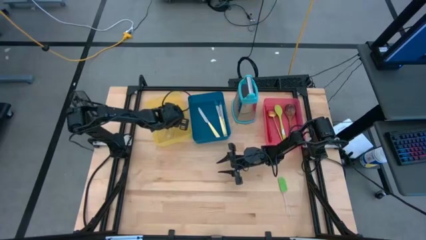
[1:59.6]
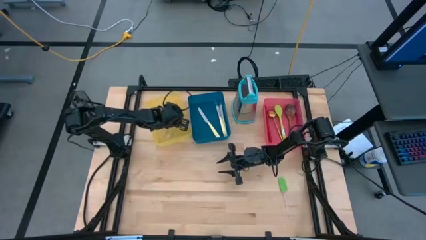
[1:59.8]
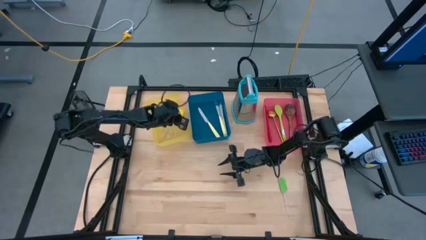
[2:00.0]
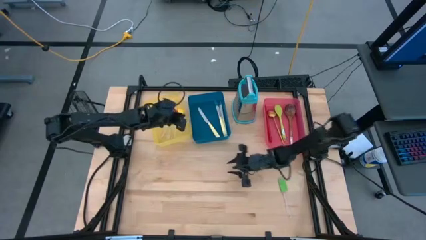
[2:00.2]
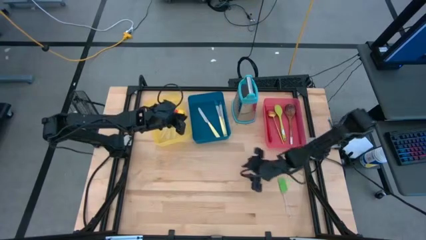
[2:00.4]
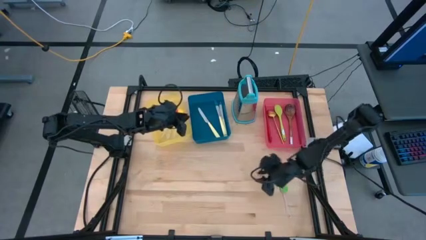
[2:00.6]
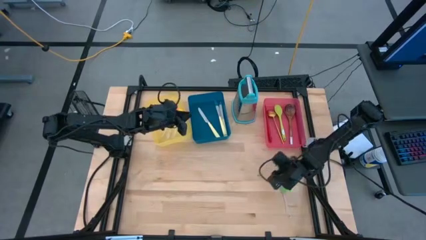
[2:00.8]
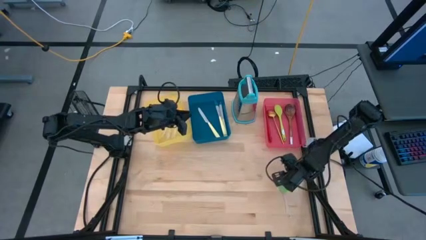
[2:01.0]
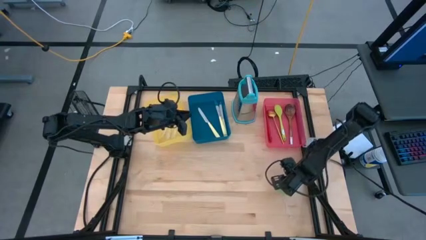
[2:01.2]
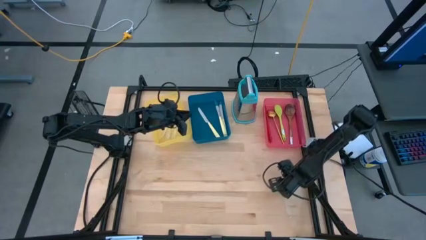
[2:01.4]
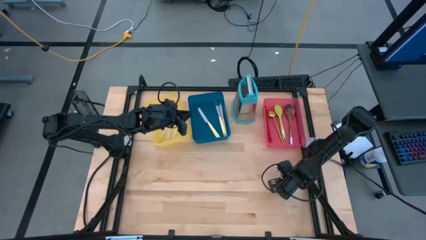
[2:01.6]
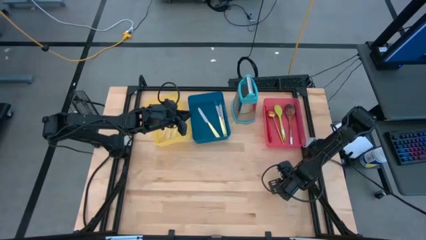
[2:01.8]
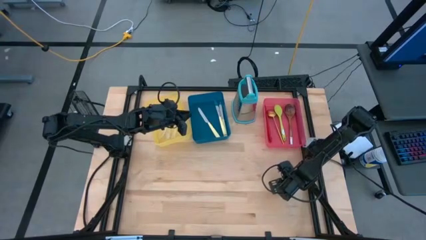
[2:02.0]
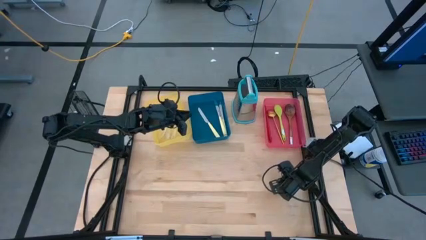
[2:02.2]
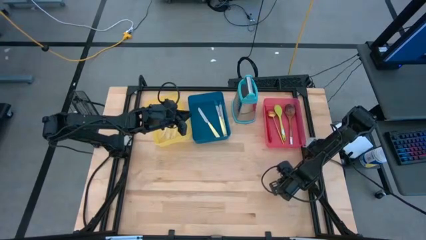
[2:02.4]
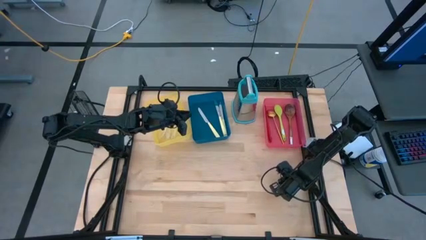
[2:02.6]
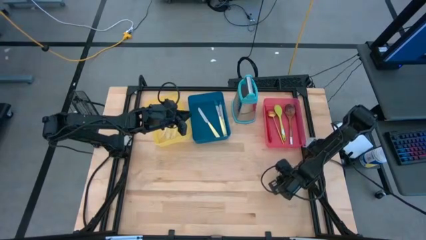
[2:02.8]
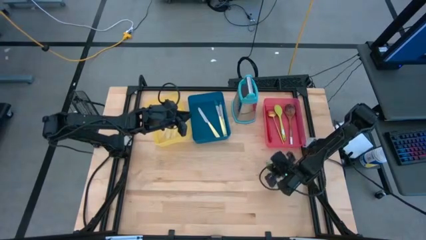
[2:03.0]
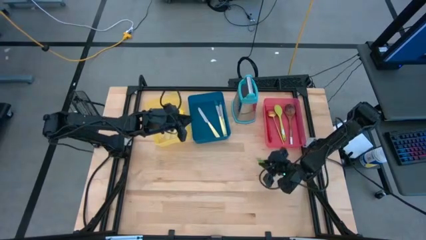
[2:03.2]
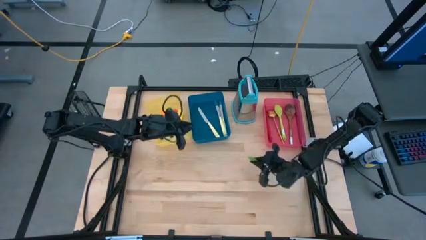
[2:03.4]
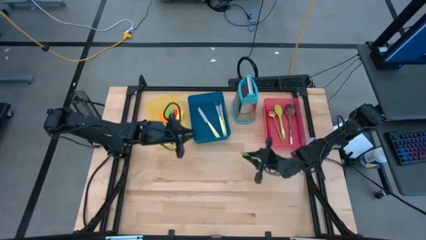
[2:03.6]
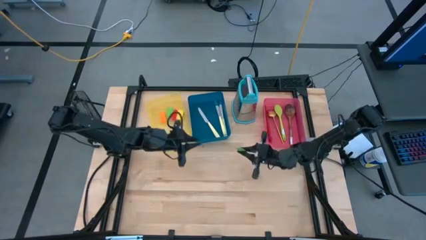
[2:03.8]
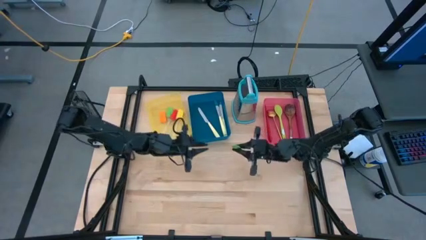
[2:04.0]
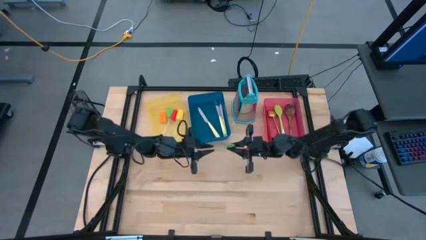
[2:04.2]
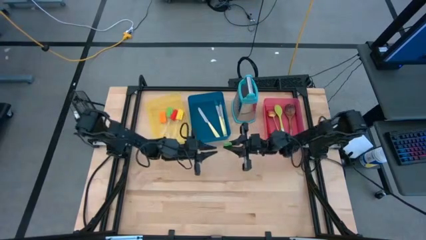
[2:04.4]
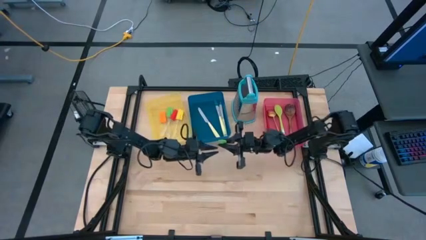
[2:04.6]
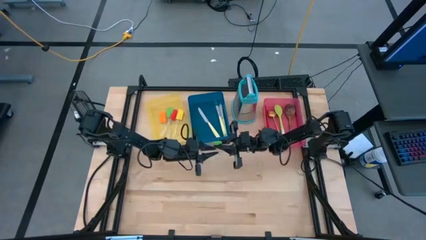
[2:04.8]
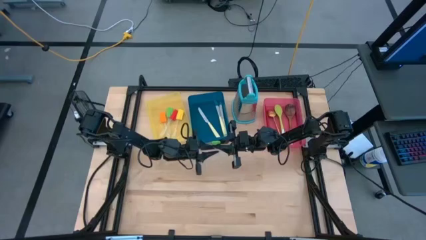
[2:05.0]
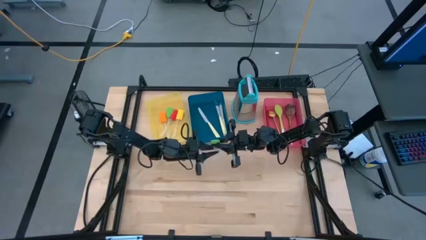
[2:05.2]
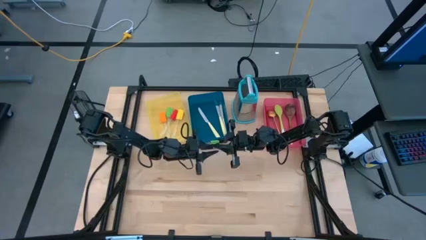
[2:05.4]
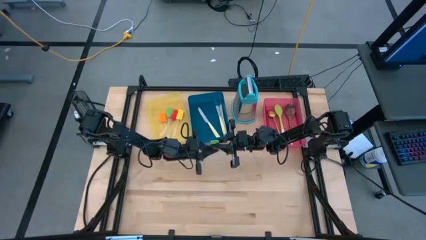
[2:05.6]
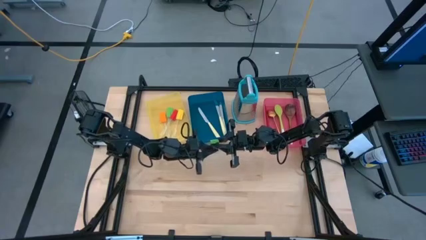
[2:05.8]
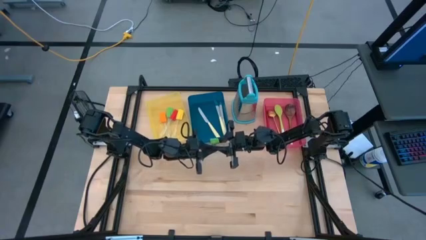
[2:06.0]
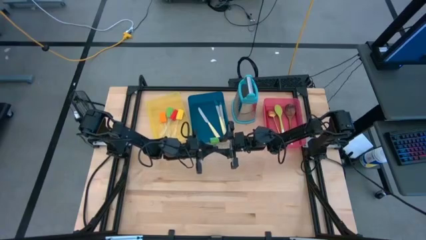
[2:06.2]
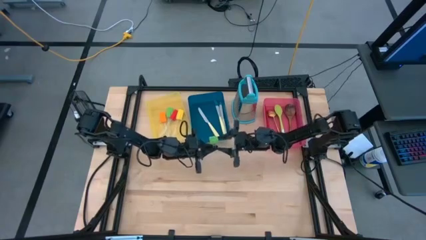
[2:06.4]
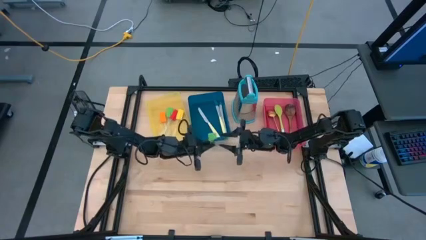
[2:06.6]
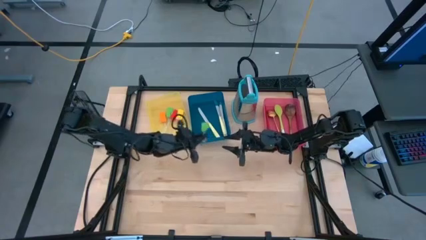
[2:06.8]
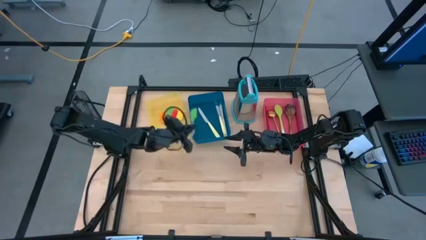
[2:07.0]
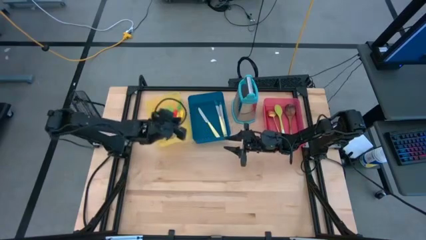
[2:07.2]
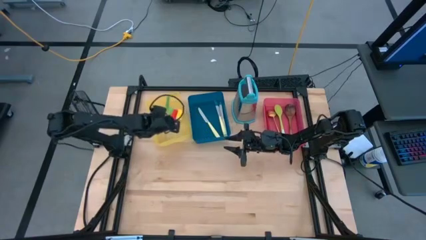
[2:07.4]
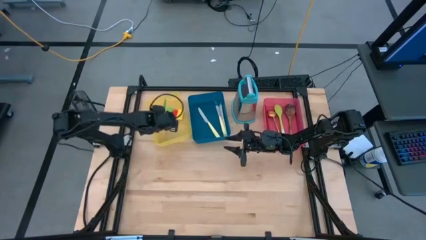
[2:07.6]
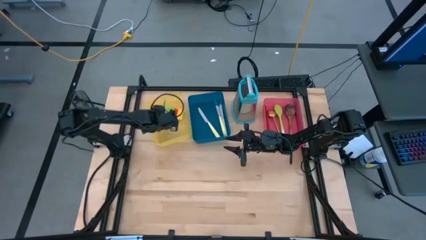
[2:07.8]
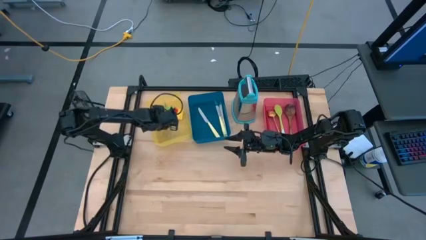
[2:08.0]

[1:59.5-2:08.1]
Task: Pick & Place Kitchen Items
Put the green spatula into the yellow bin

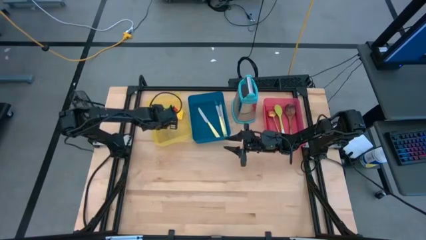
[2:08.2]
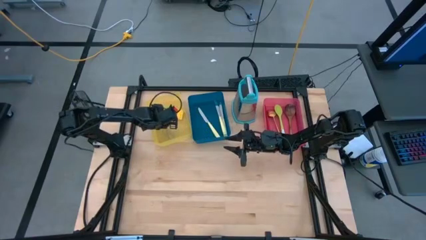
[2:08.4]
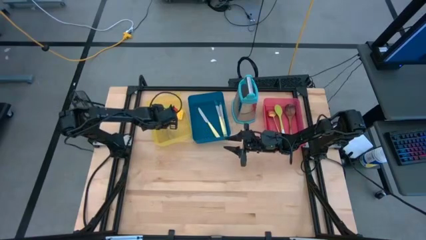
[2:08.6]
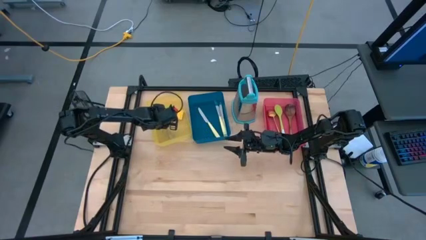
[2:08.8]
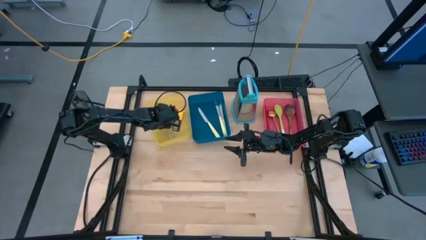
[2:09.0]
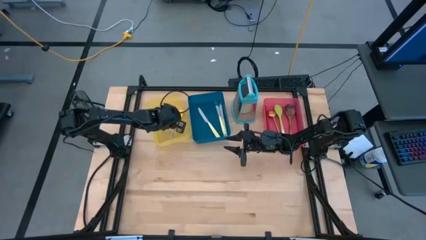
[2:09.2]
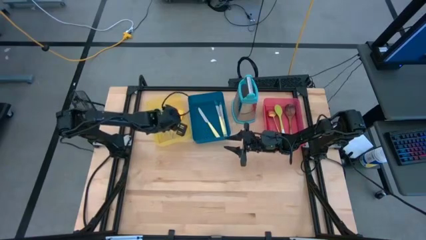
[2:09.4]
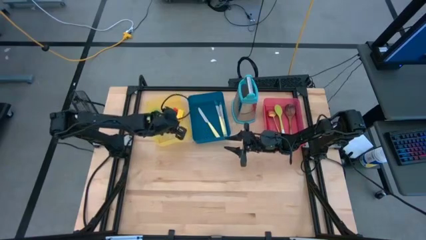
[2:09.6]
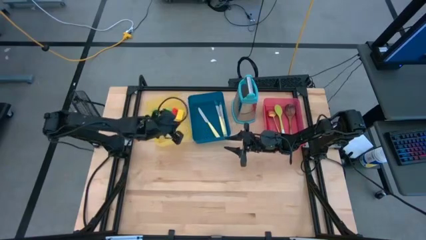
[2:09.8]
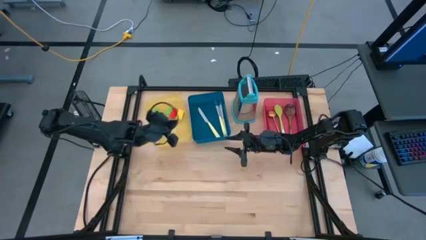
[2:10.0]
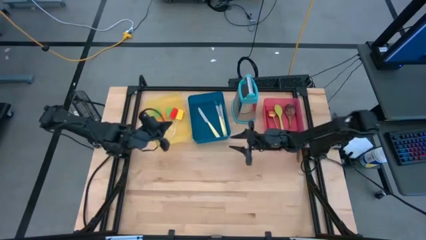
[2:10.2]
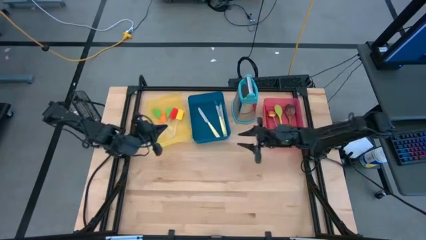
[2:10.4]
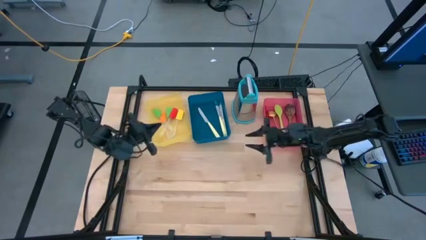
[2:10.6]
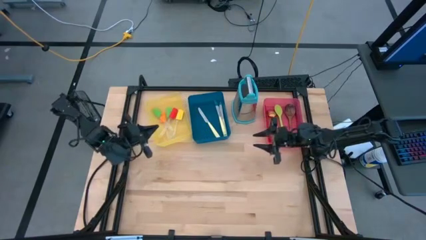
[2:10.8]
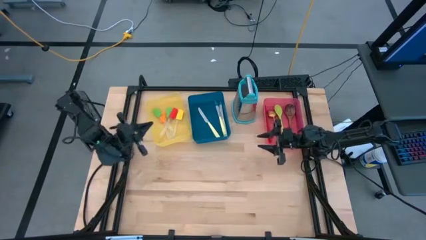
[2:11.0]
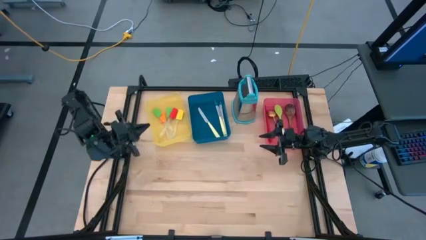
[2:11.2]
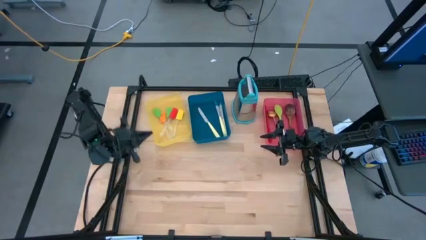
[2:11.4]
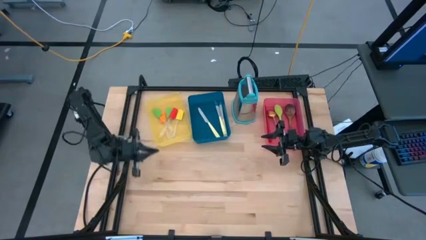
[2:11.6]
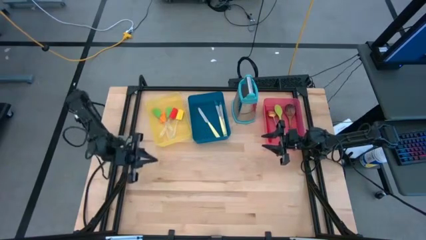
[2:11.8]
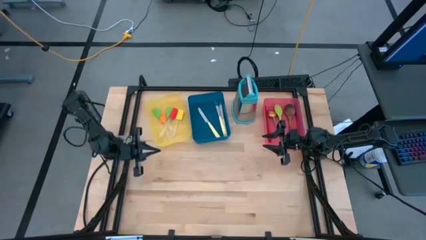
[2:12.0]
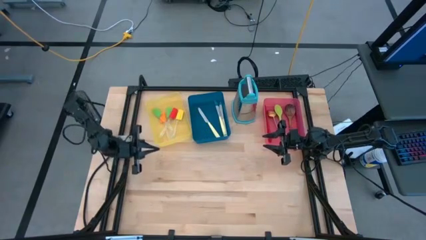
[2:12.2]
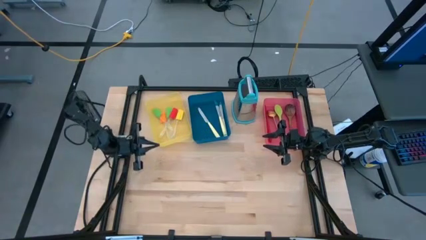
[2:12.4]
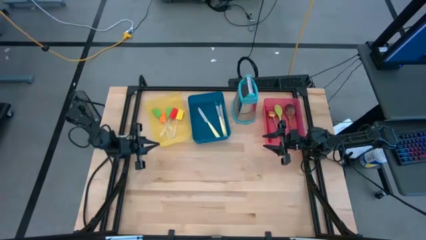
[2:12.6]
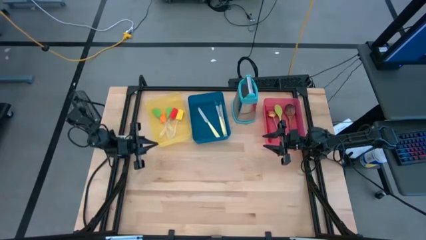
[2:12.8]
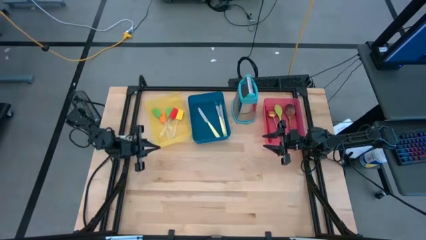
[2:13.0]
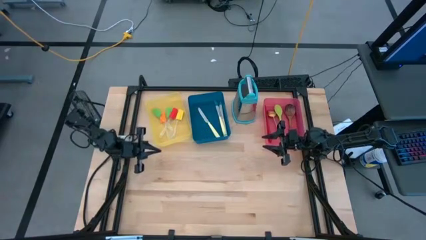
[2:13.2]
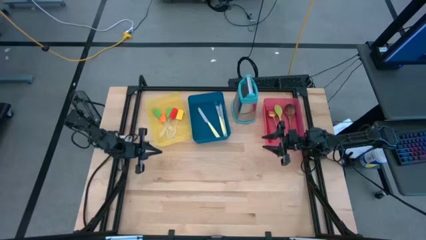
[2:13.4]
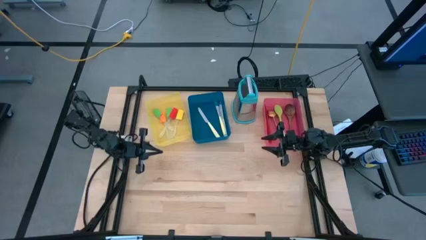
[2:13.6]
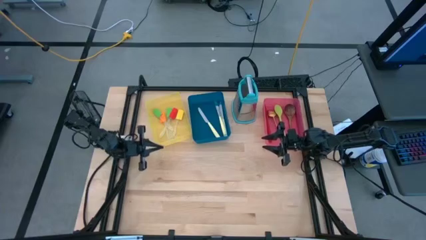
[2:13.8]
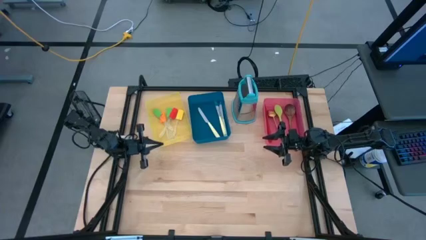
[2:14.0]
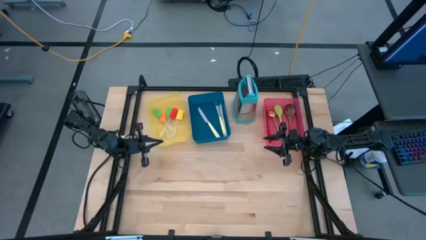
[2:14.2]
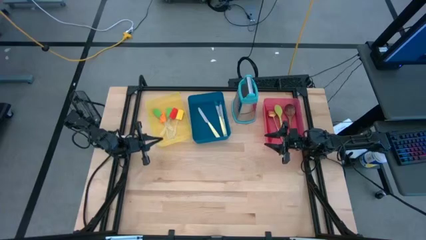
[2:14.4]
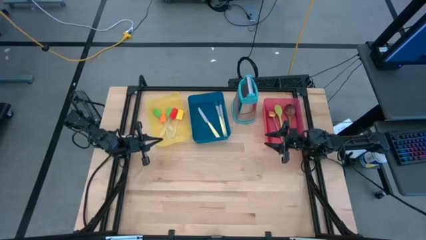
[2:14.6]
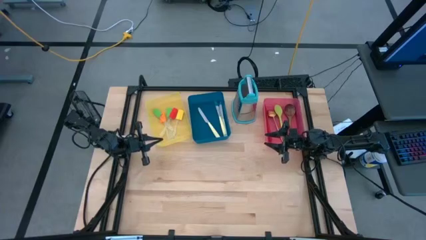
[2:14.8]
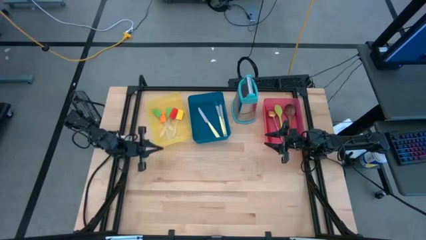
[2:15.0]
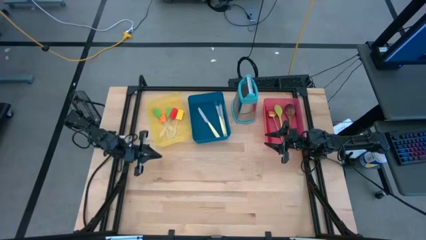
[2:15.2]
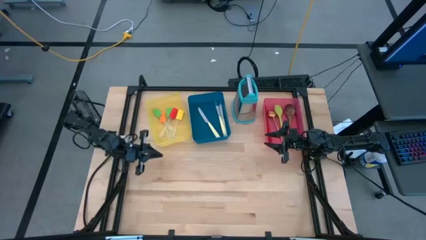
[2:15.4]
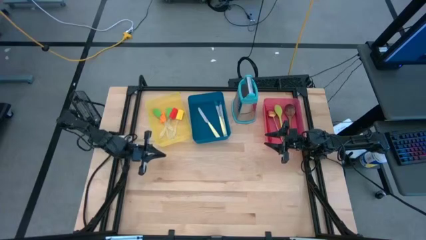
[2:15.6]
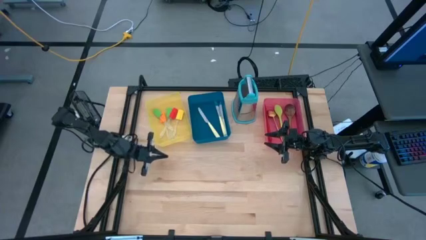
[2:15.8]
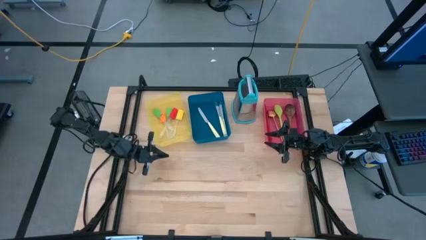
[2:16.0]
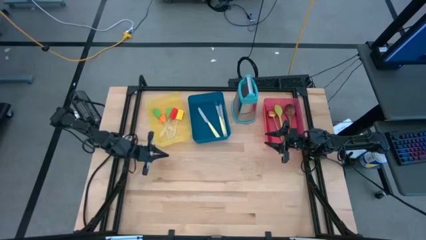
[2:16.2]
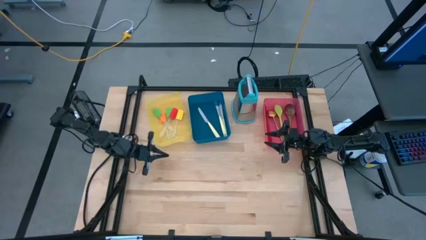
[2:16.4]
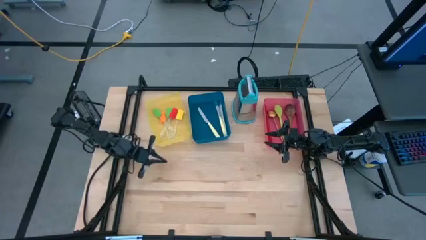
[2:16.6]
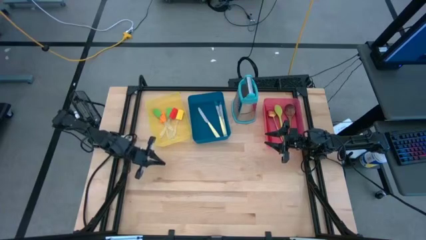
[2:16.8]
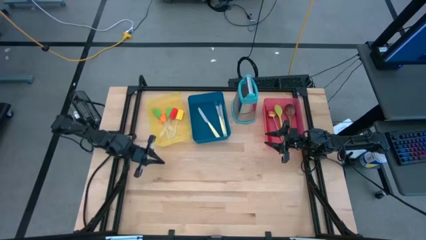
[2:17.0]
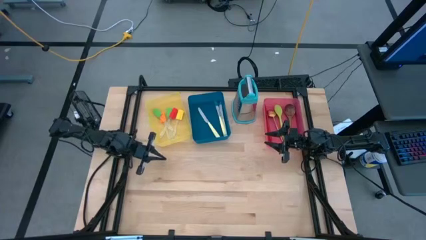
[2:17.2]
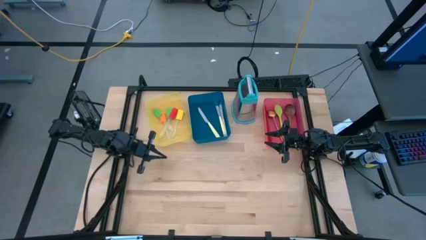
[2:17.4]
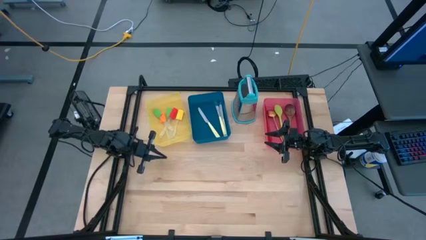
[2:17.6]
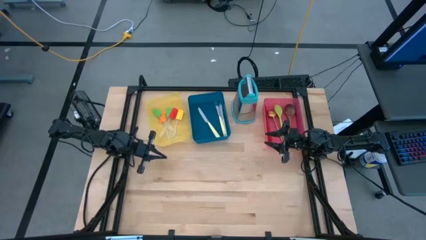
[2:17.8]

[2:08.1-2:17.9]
Return to Home Position
